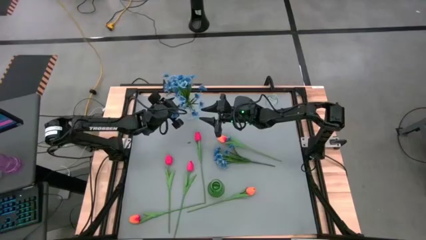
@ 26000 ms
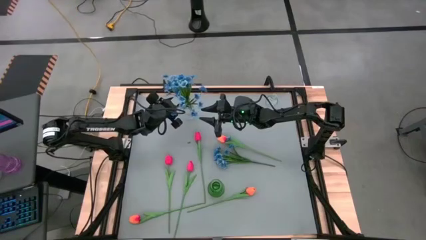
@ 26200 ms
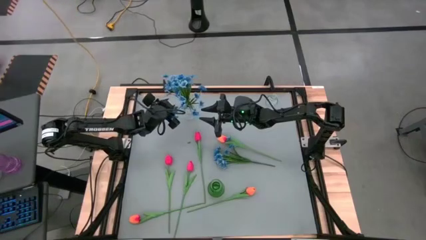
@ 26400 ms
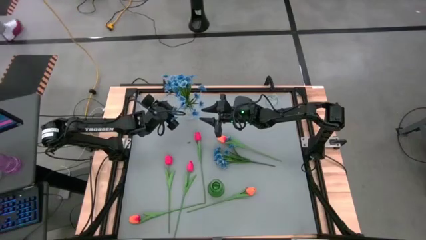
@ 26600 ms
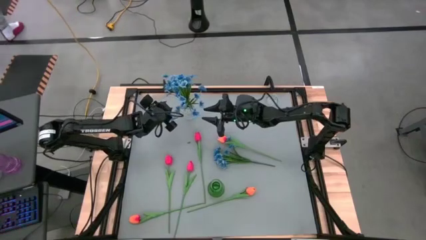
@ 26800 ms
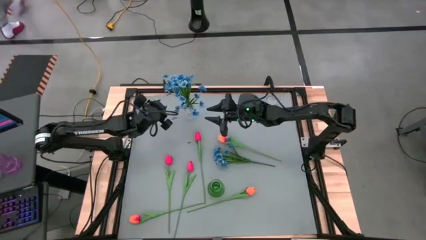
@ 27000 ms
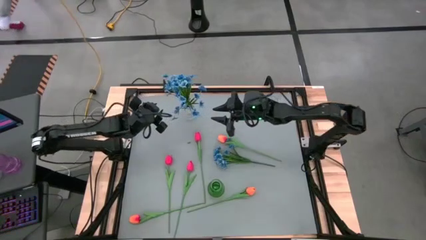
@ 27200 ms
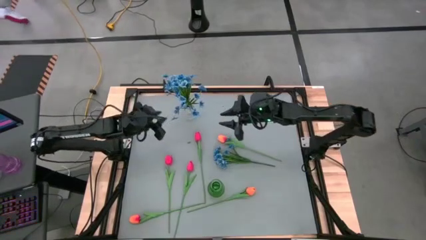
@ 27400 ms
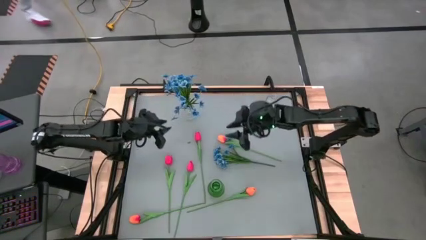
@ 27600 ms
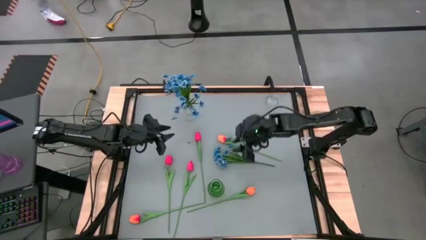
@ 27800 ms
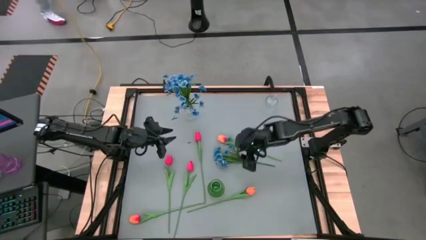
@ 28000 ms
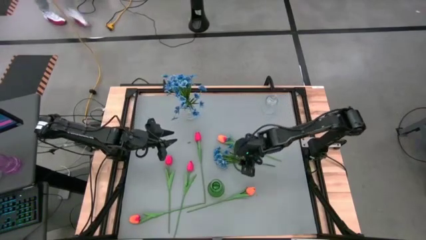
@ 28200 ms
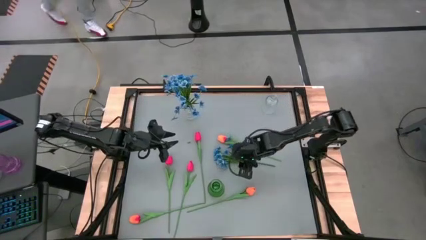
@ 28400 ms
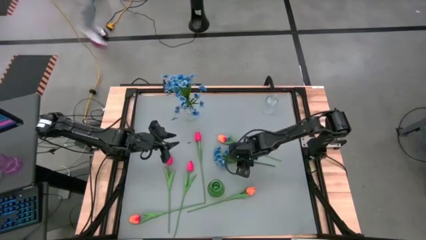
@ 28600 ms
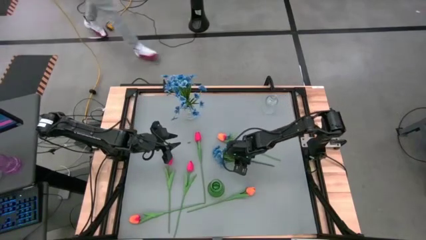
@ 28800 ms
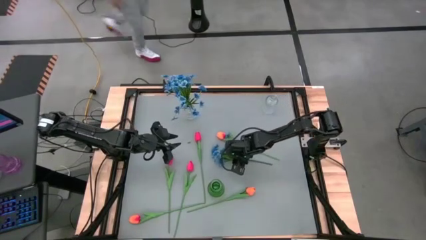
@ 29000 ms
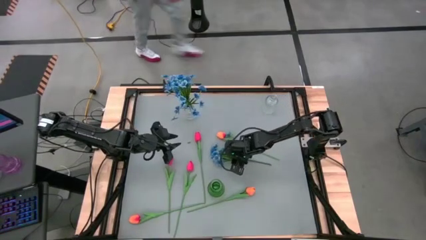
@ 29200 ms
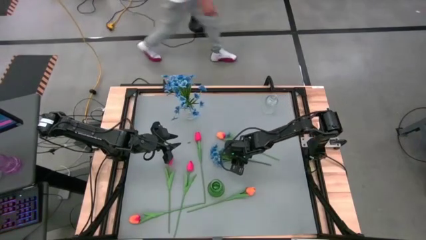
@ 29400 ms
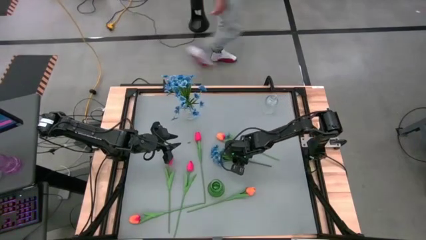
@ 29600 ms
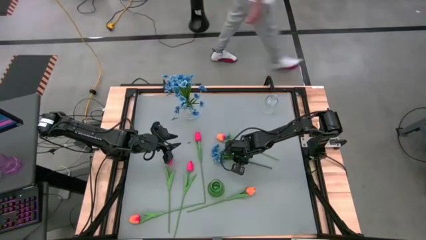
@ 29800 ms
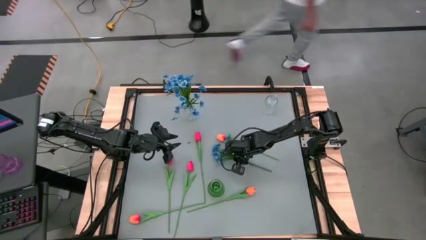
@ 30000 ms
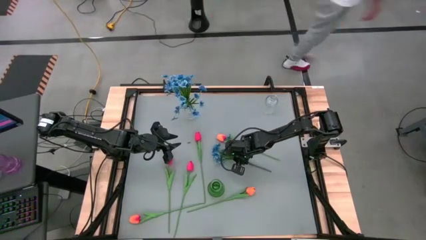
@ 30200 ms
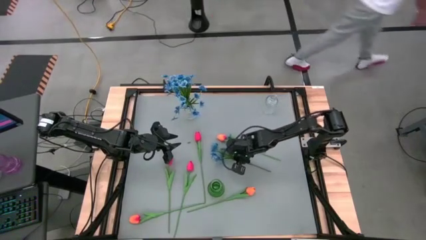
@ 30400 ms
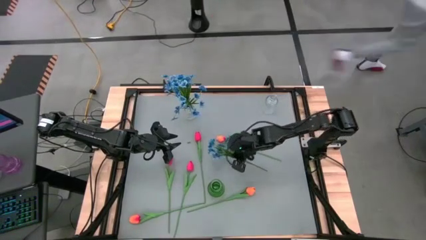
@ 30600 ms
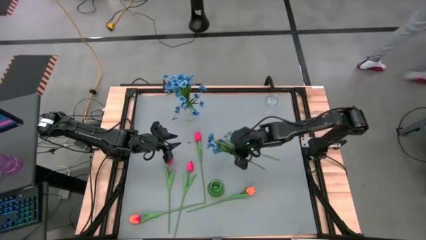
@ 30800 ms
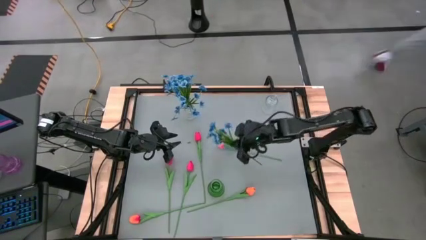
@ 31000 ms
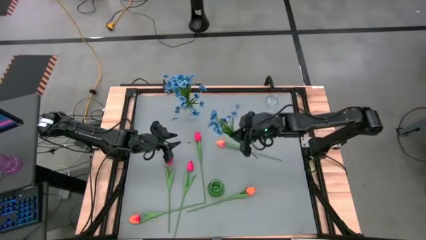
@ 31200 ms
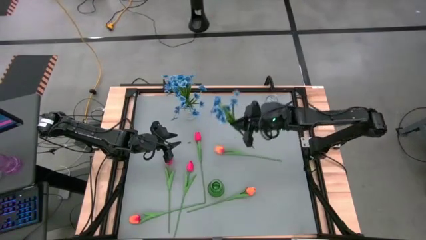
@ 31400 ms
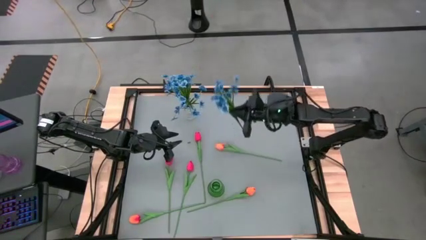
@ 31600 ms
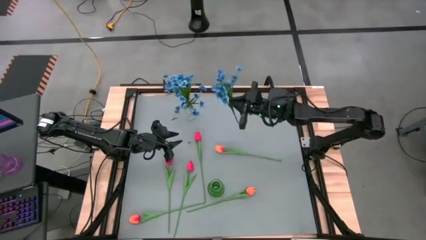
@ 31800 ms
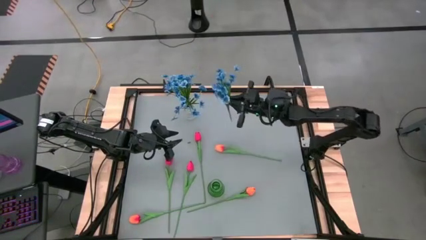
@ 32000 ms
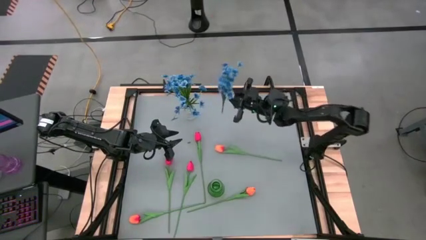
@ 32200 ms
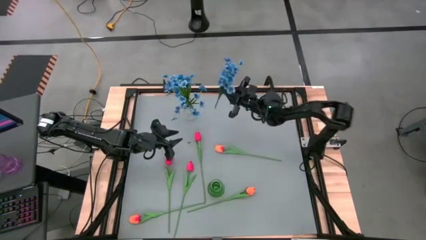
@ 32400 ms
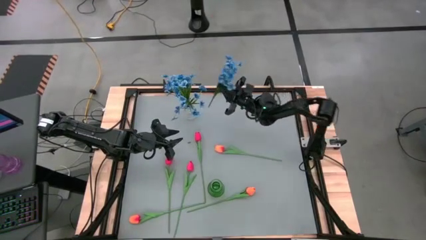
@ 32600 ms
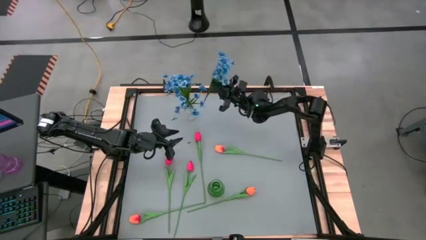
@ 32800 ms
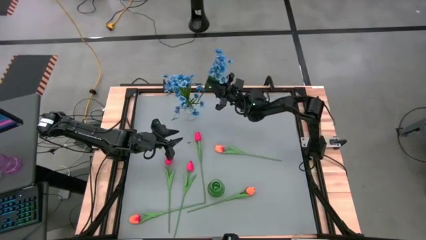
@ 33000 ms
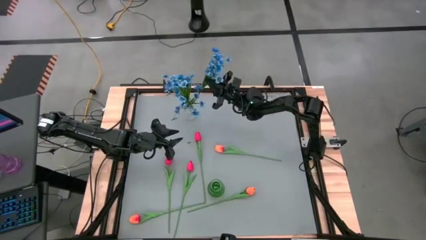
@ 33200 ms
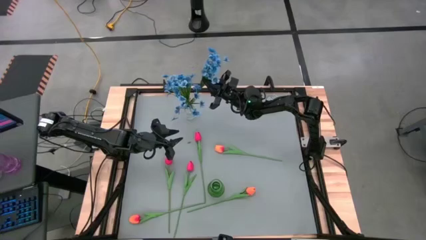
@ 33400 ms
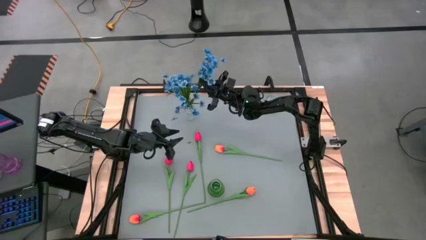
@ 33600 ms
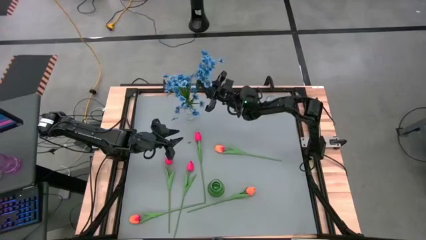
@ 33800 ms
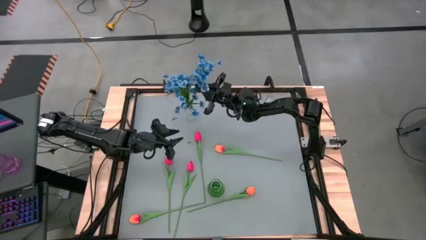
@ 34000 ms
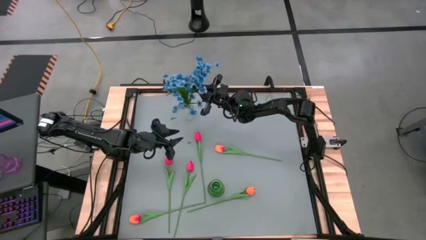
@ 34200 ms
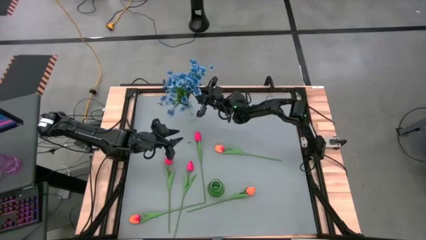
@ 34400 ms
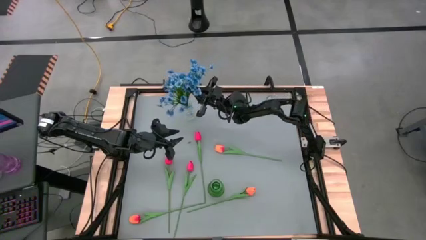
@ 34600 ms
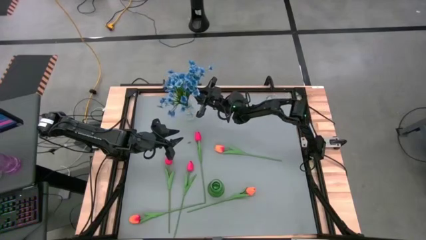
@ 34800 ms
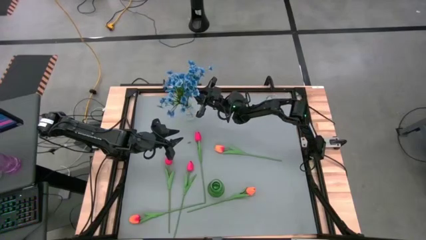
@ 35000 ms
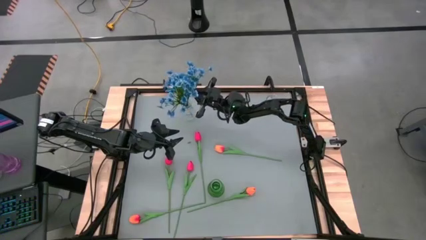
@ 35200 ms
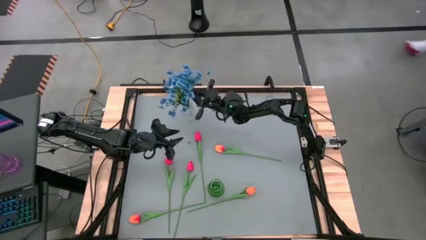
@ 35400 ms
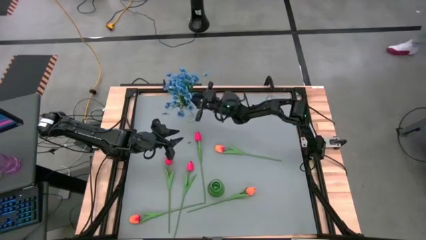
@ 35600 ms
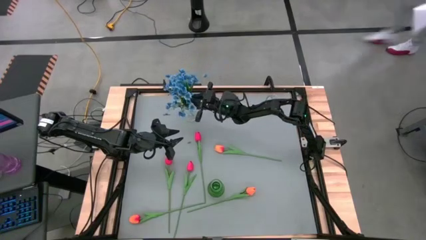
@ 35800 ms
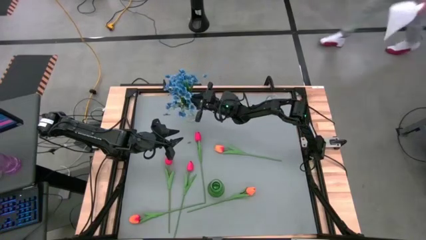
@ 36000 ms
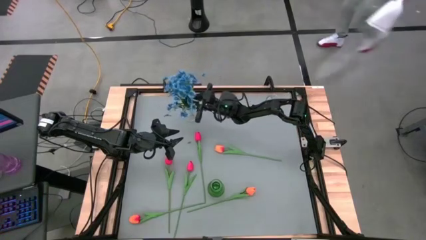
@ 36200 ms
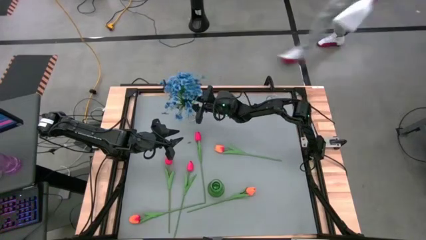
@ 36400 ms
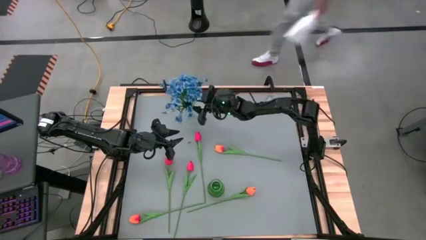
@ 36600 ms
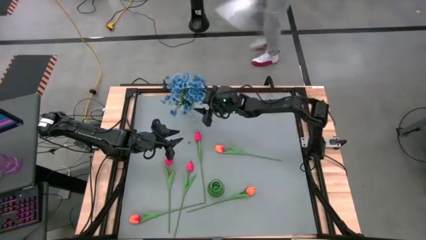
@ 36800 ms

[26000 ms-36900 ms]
Task: Sort flowers into vase by color
Put the blue flowers into the top left transparent vase

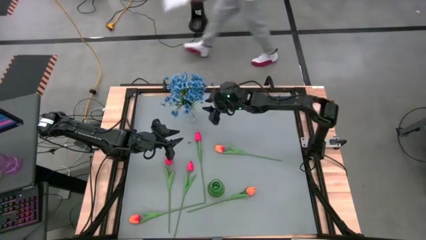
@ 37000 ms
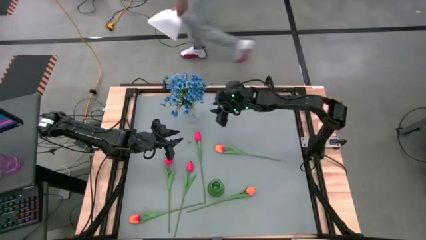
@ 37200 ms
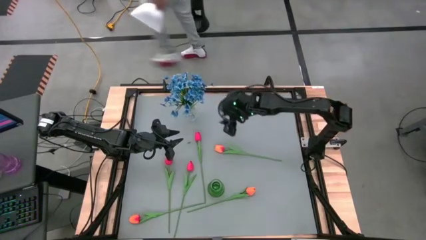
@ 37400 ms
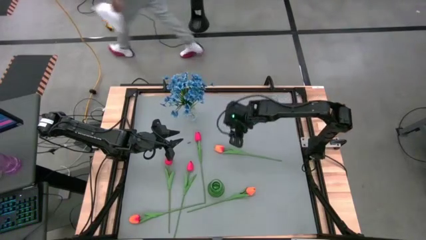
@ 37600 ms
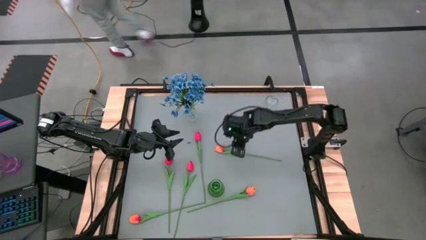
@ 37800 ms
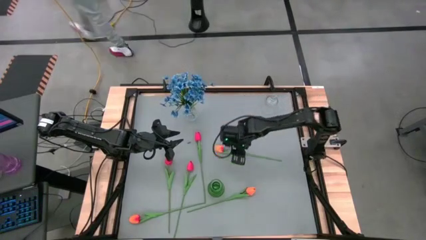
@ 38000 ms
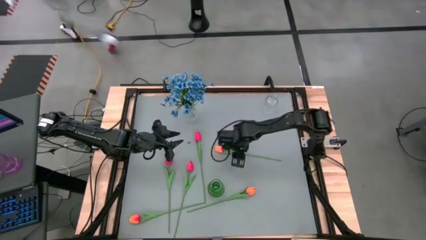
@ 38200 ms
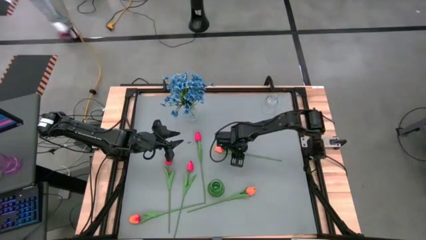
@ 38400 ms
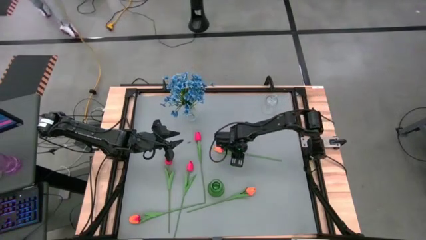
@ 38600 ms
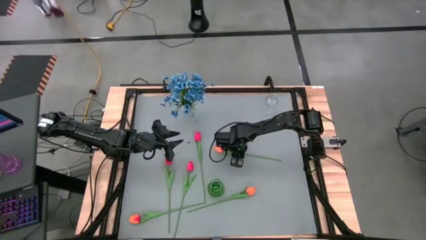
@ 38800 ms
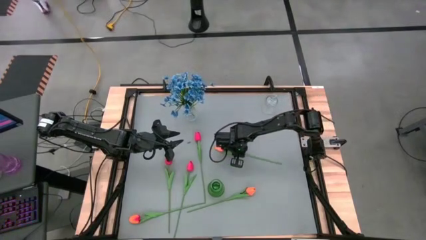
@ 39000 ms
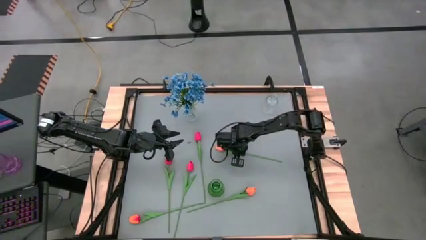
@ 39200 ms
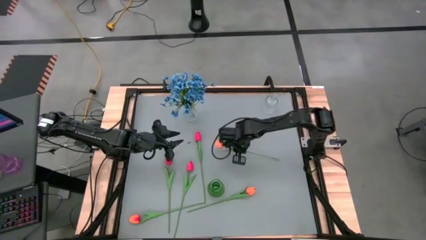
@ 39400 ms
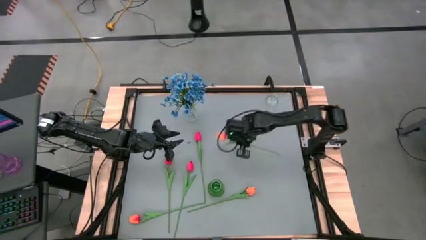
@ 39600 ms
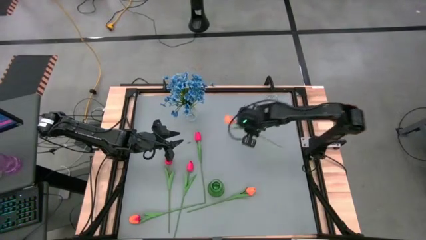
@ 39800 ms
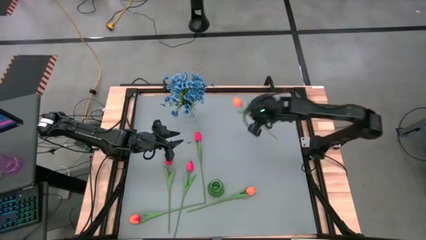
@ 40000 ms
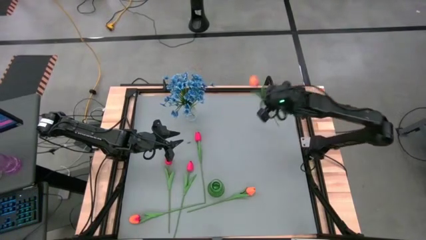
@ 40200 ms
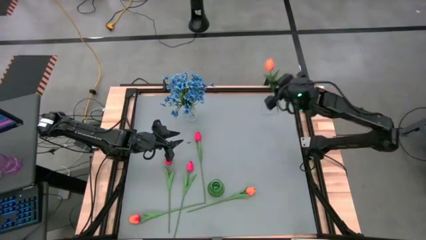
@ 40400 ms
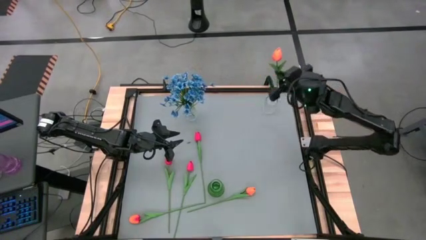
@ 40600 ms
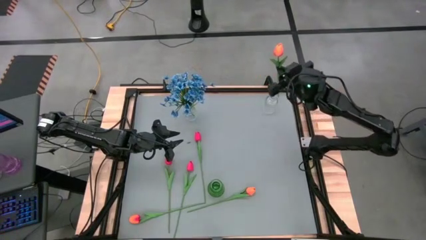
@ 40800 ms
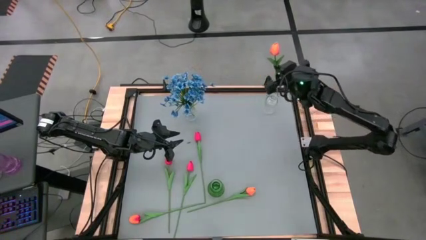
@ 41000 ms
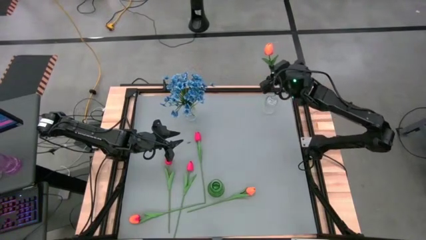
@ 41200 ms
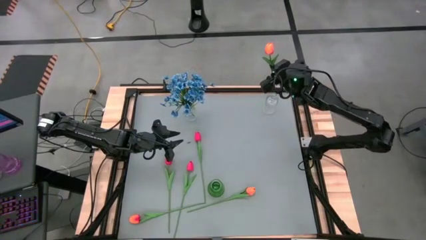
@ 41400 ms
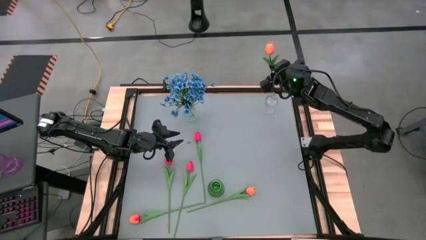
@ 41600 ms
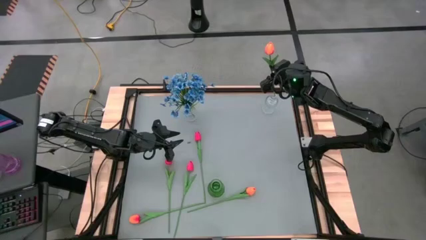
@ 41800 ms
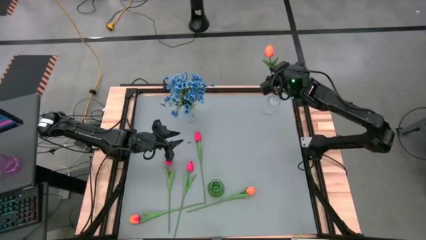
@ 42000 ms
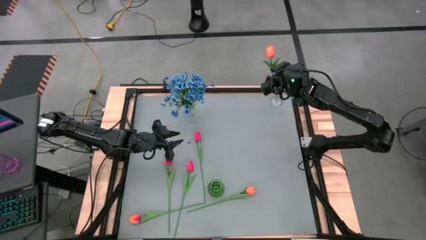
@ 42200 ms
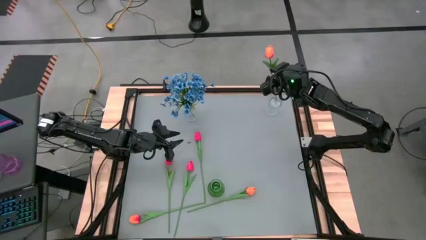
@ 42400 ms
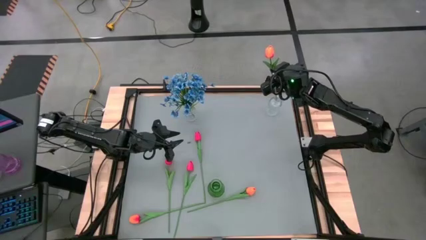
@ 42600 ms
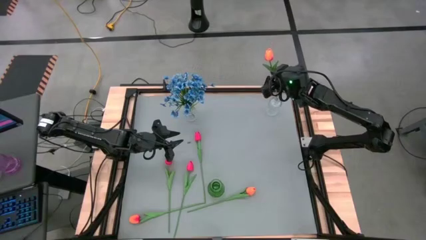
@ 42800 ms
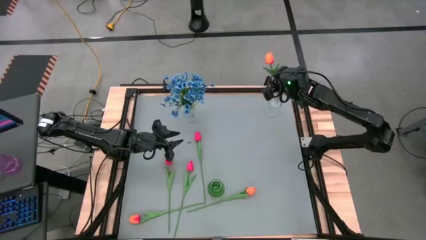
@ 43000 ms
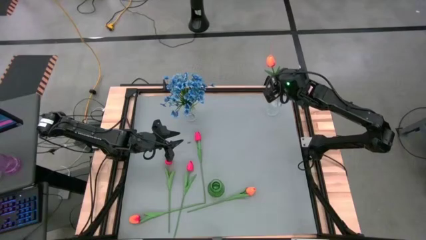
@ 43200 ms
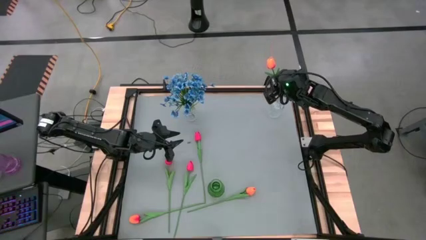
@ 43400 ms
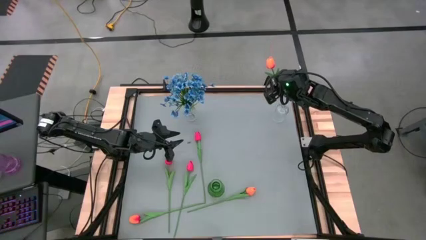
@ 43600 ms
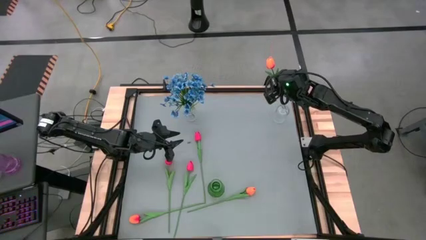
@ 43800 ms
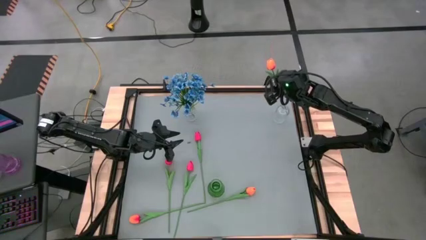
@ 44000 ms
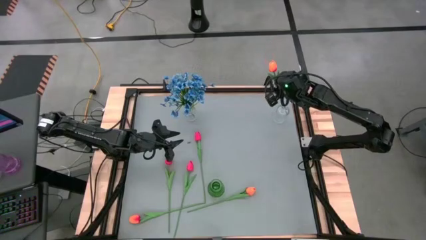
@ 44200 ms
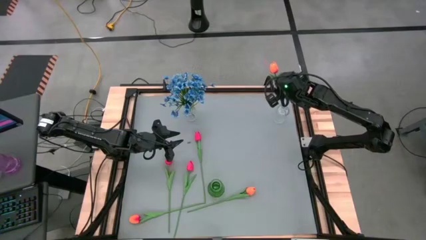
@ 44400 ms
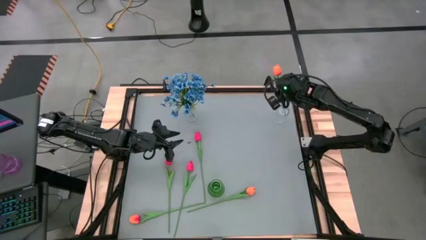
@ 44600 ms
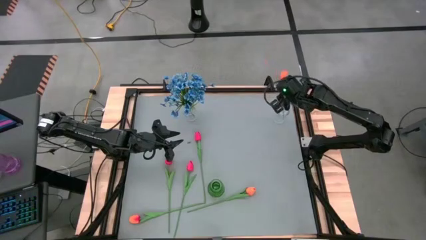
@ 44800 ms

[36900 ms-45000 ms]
Put the top right orange tulip into the top right transparent vase
